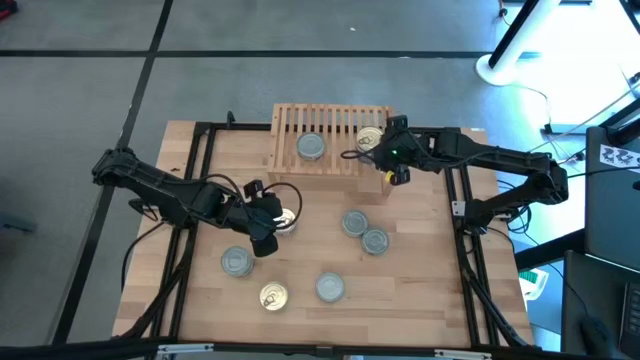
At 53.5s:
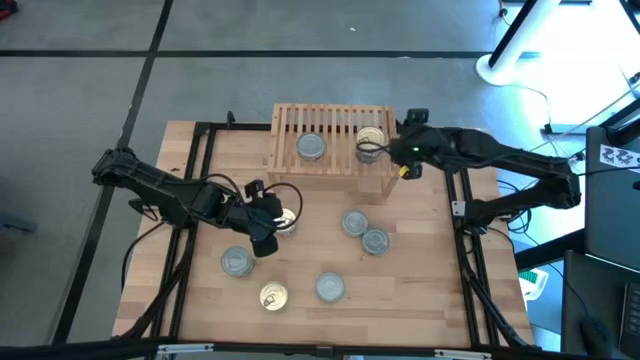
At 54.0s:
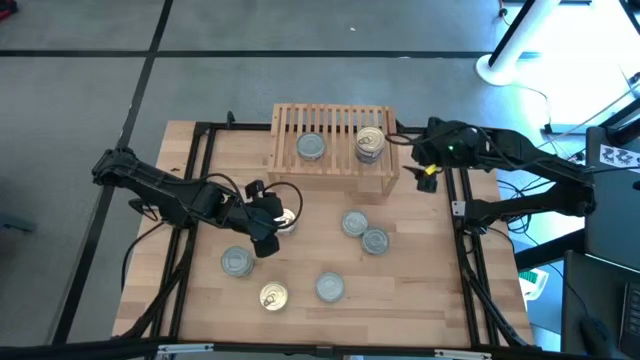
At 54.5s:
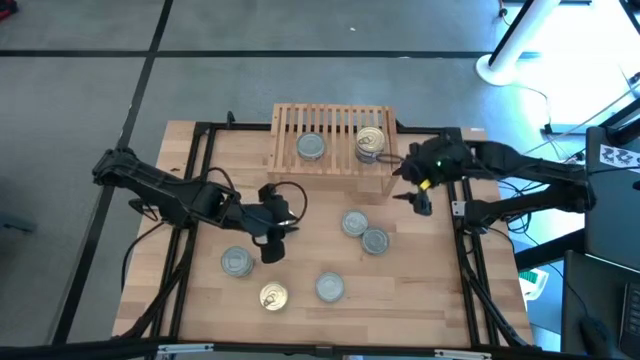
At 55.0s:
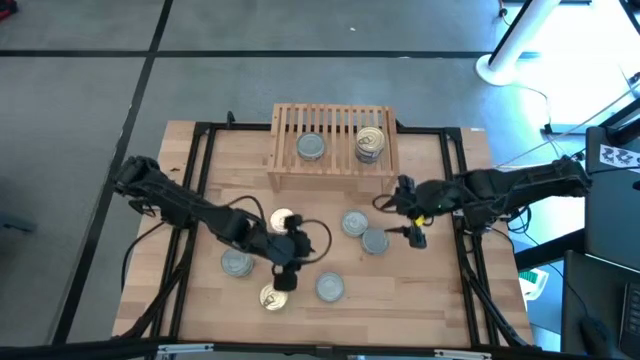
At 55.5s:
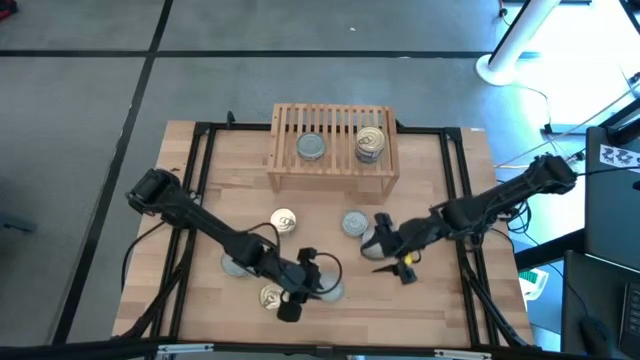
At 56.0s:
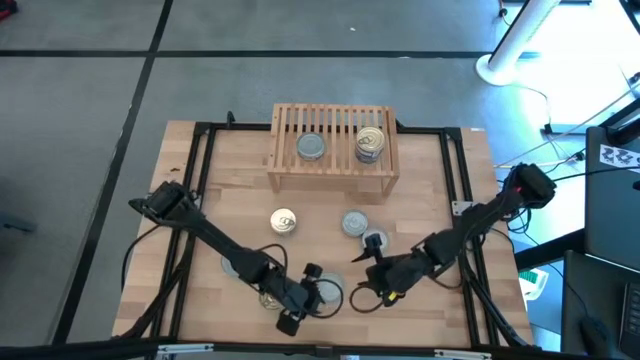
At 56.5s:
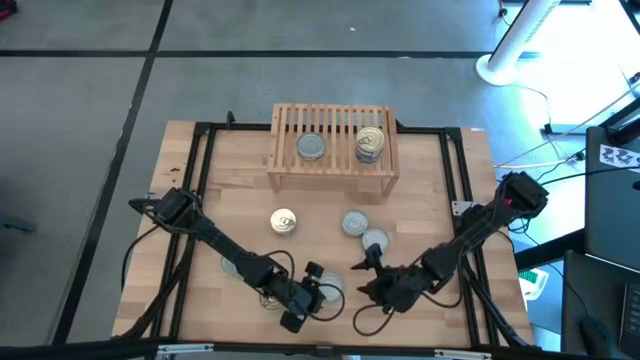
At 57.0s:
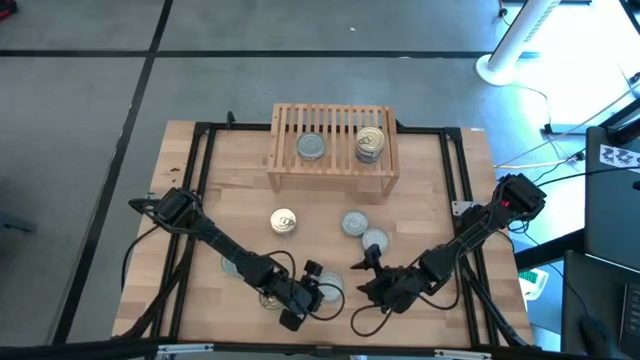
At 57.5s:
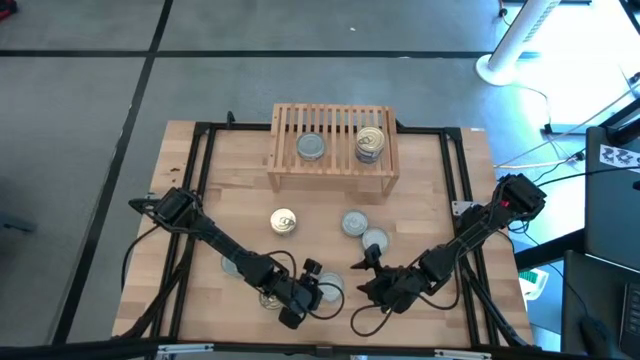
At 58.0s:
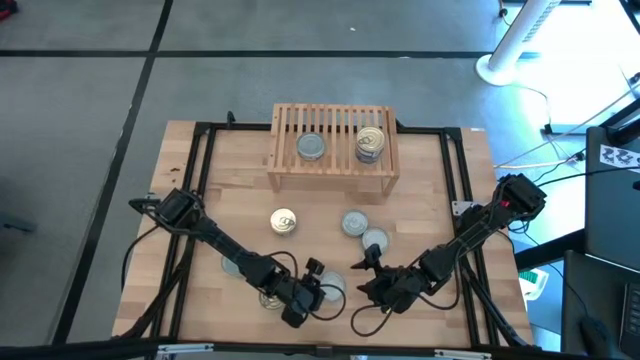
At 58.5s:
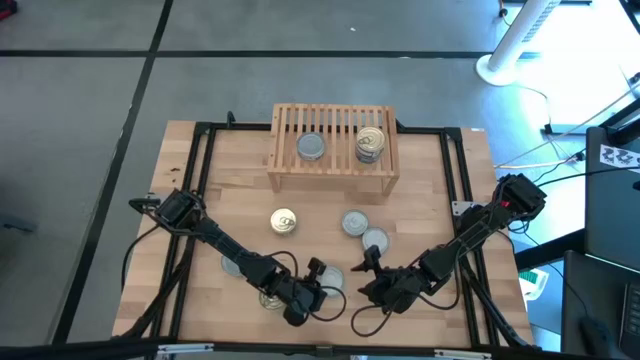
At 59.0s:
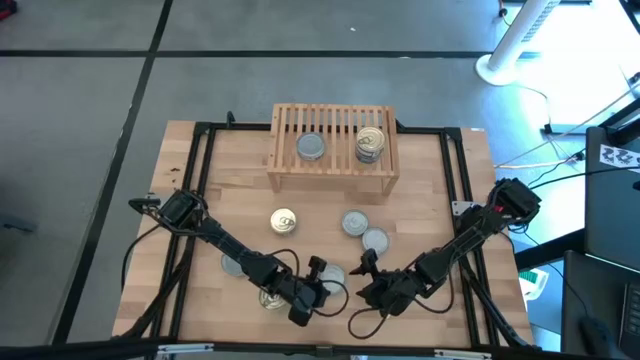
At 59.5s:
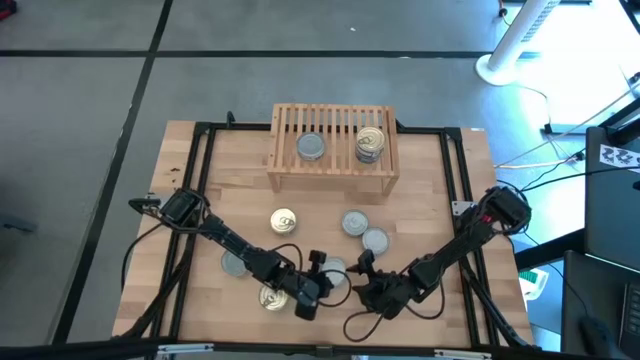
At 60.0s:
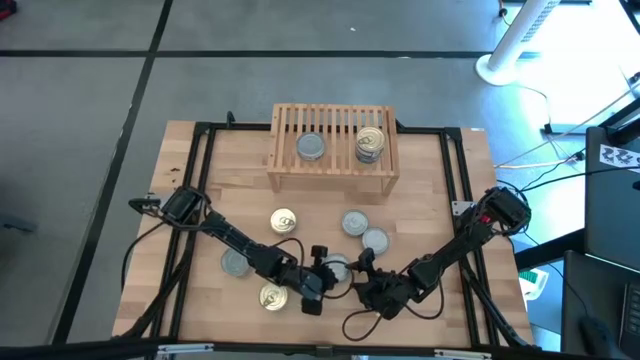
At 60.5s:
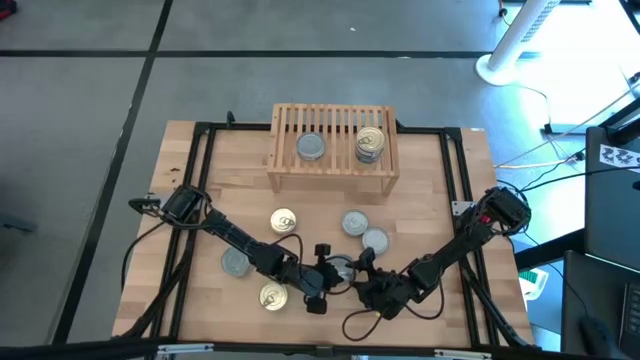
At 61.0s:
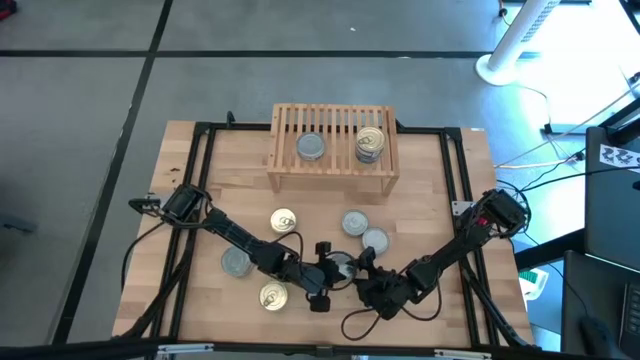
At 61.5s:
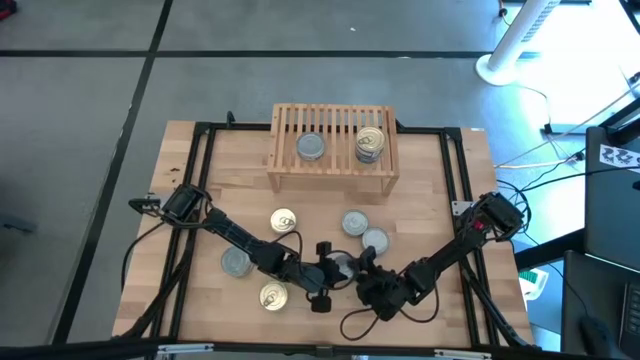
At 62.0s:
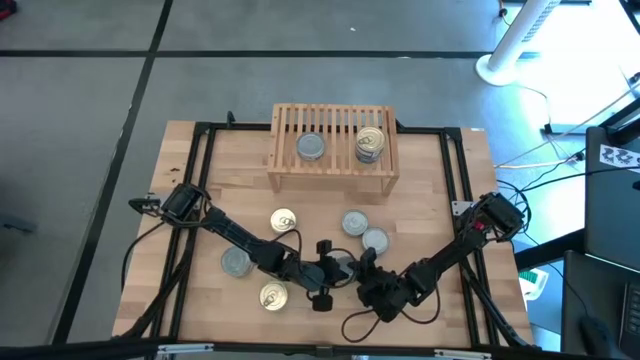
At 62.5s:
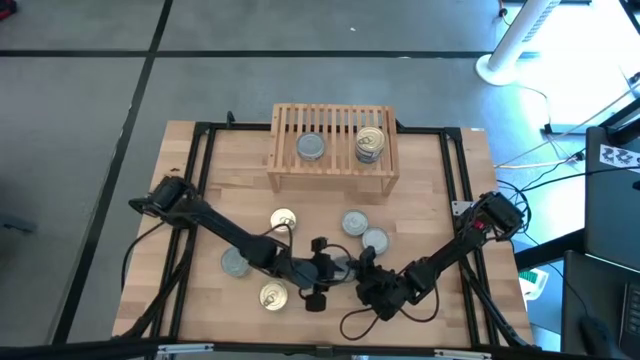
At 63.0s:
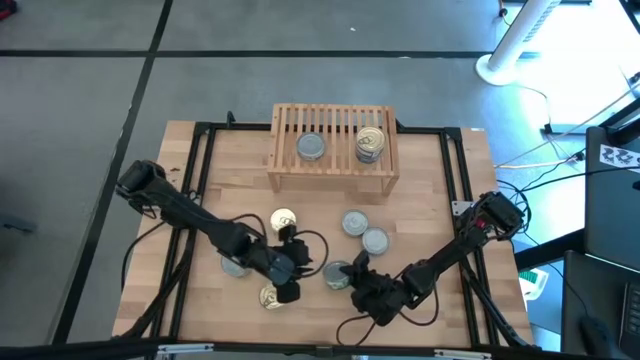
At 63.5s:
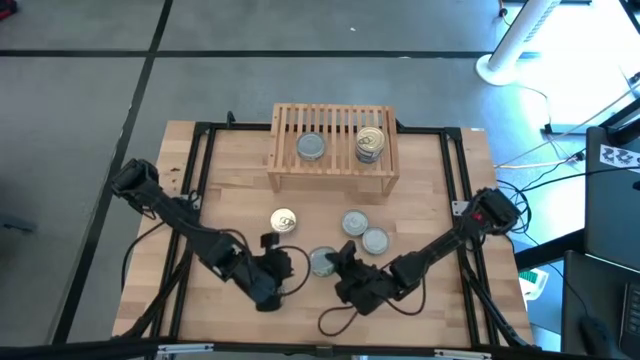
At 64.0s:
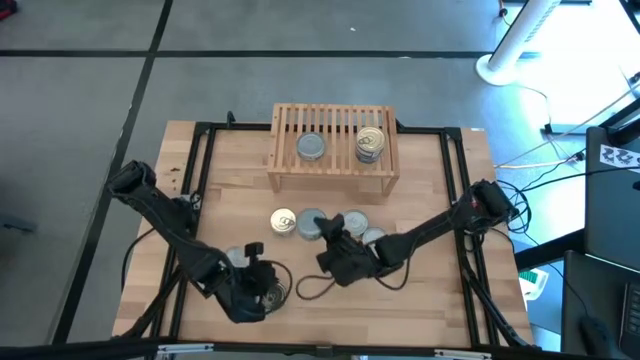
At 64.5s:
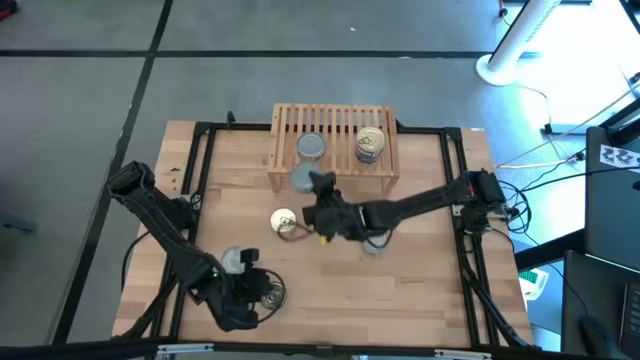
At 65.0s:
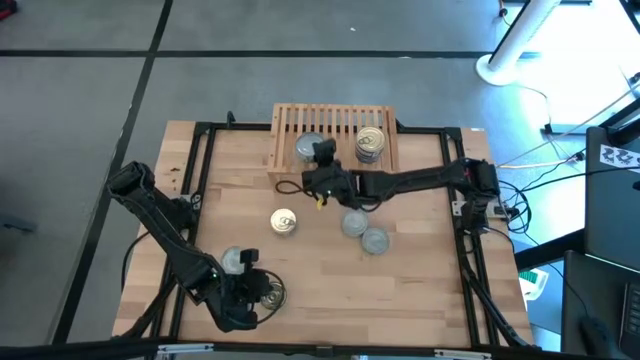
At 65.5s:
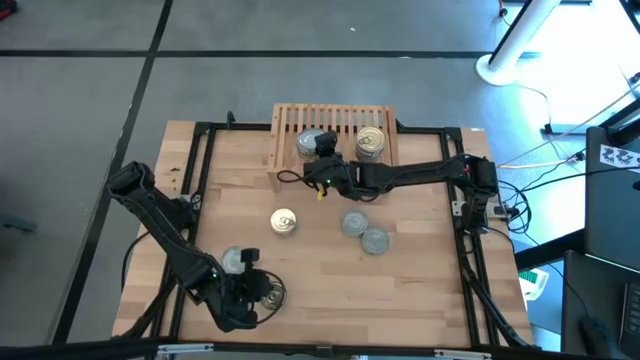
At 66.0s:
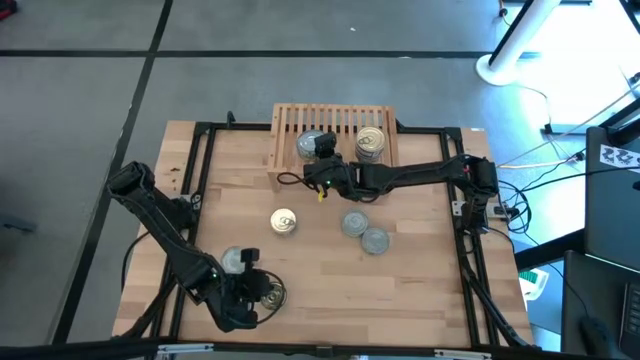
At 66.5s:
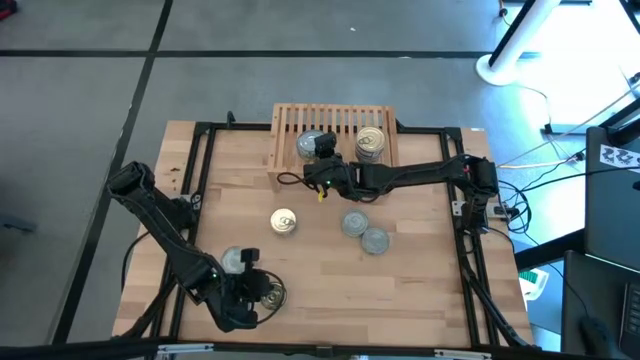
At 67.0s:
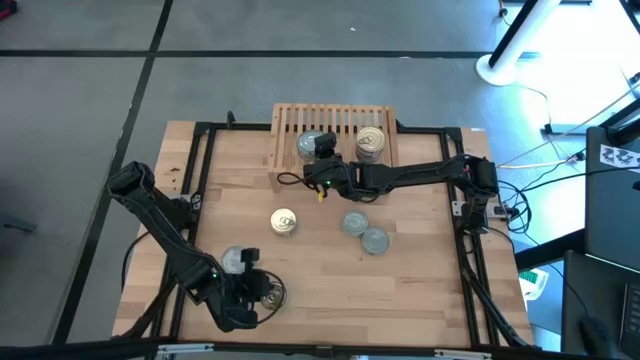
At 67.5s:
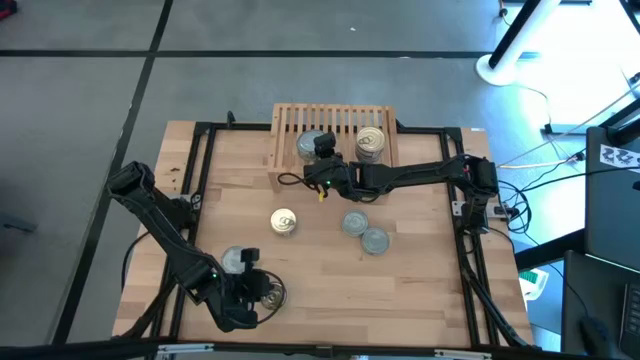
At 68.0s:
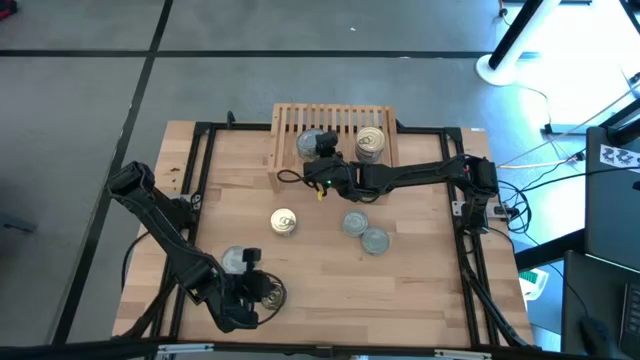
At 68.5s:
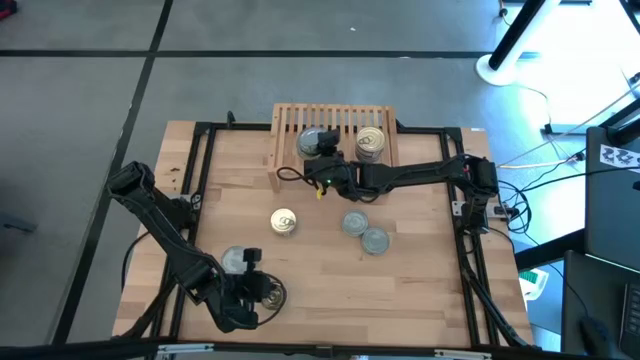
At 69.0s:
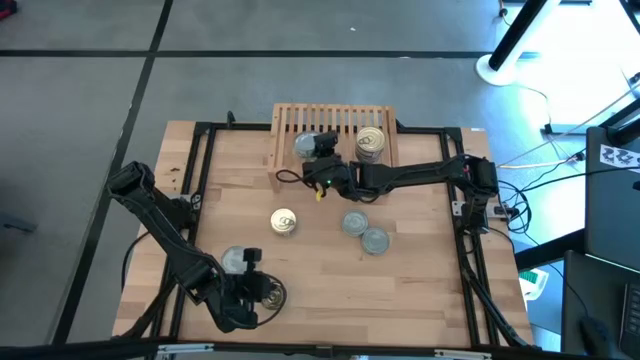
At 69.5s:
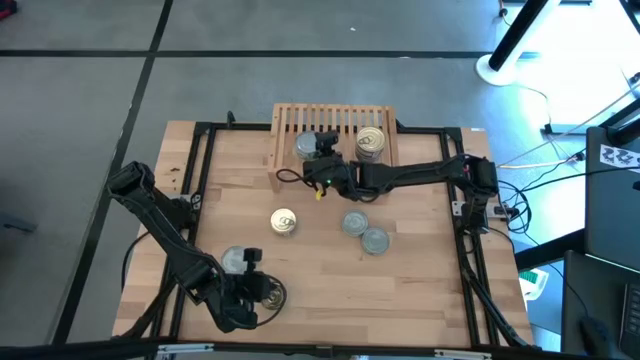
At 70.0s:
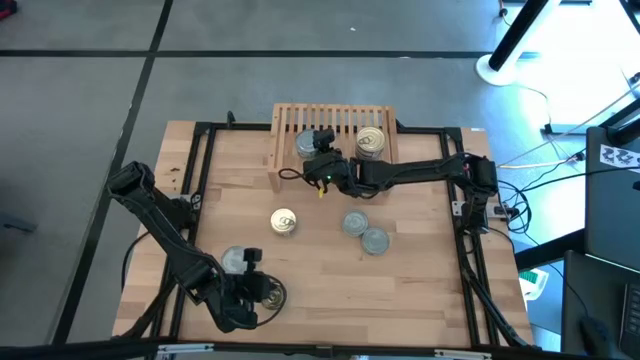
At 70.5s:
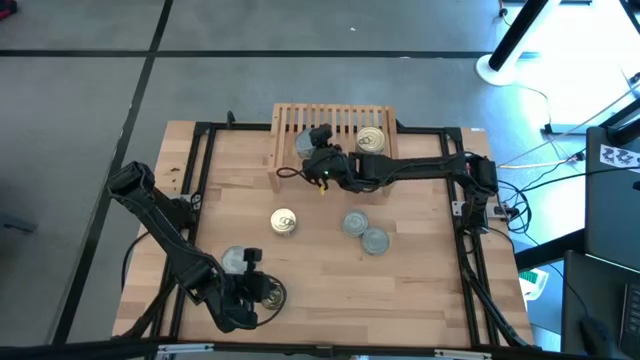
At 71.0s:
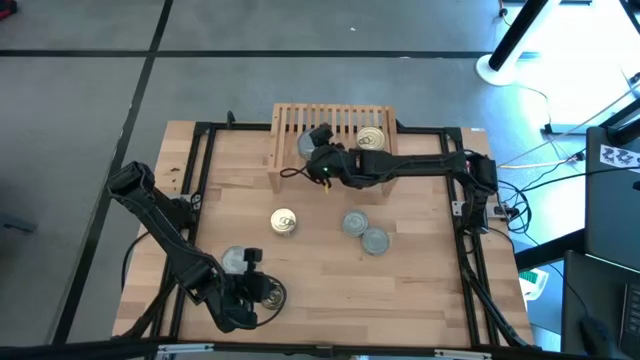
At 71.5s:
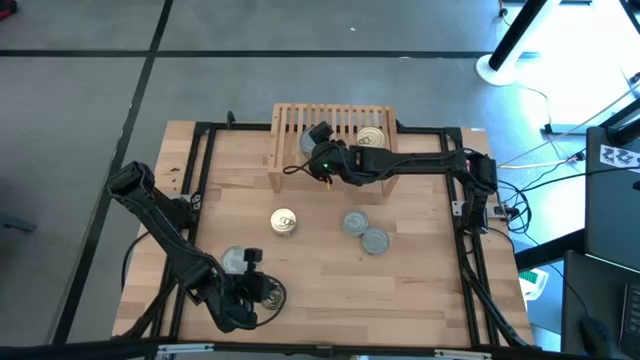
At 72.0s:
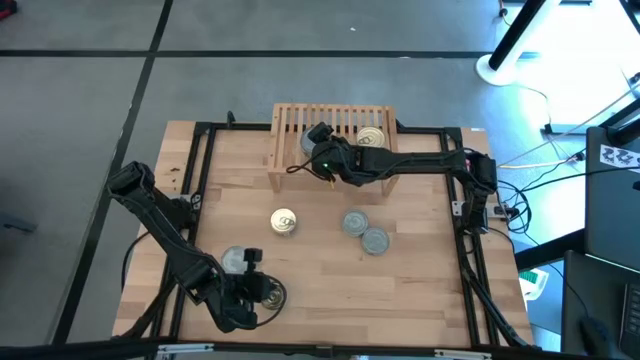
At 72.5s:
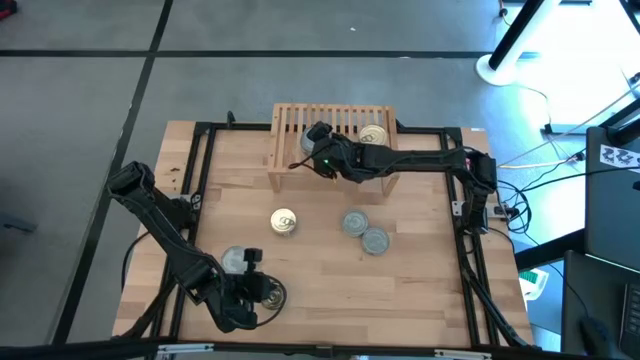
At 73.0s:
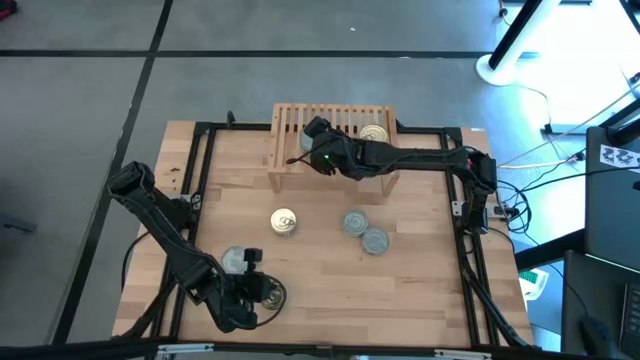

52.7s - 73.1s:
Task: Stack canned seafood by type on shelf
Stack the green white tuna can on top of the green white tuna can on the shelf
